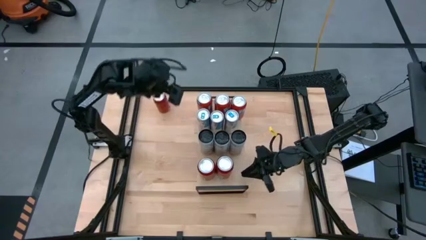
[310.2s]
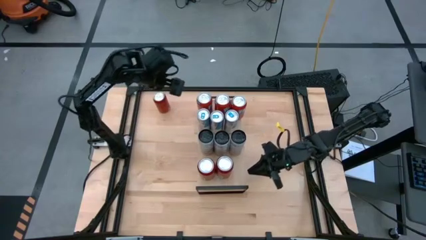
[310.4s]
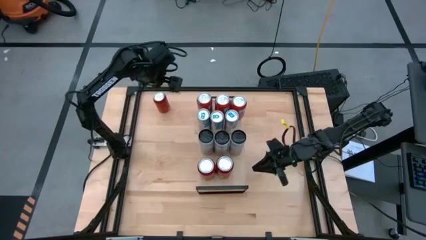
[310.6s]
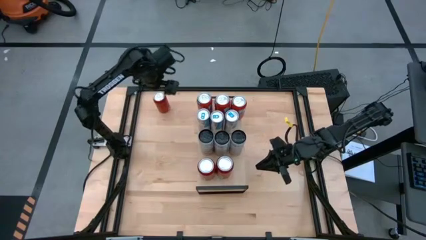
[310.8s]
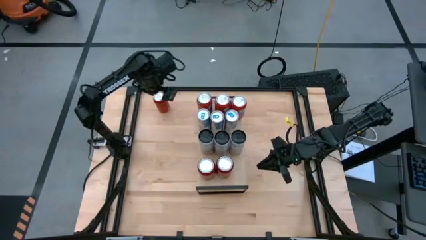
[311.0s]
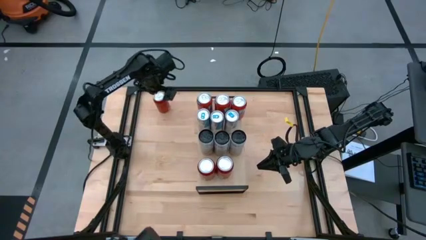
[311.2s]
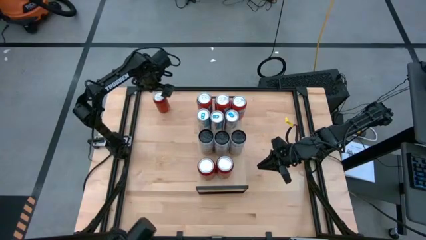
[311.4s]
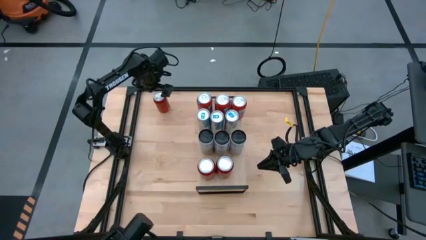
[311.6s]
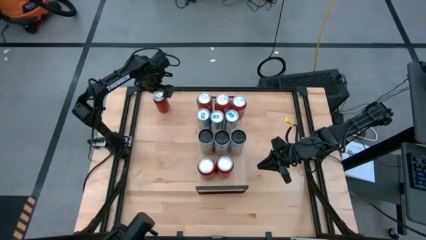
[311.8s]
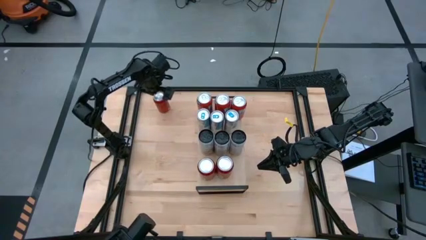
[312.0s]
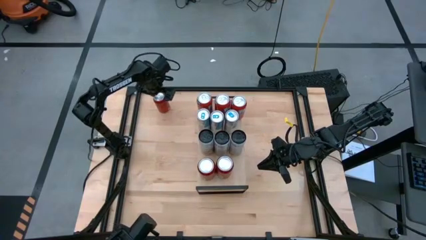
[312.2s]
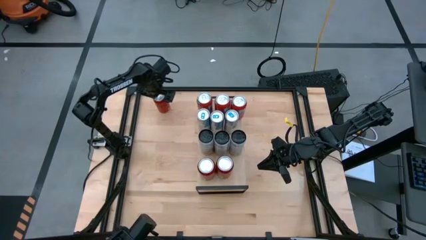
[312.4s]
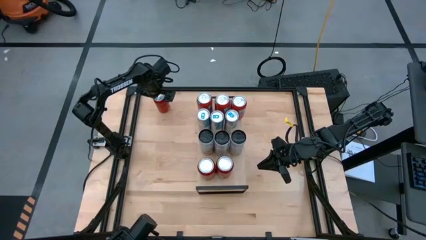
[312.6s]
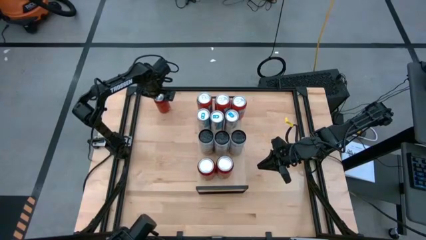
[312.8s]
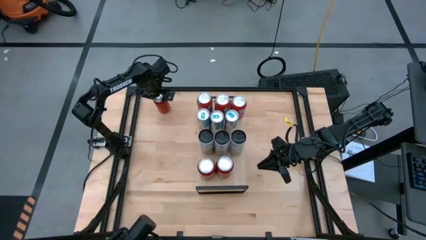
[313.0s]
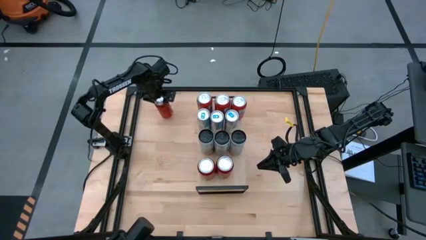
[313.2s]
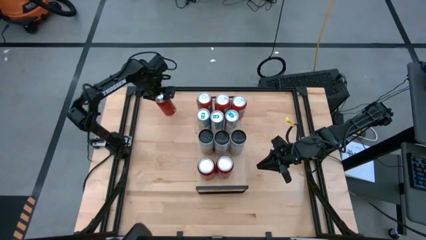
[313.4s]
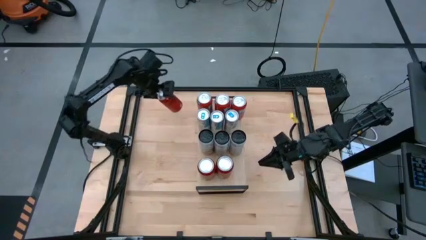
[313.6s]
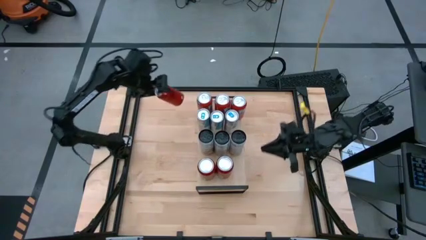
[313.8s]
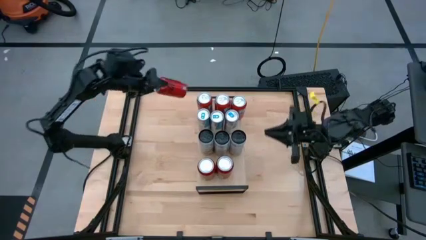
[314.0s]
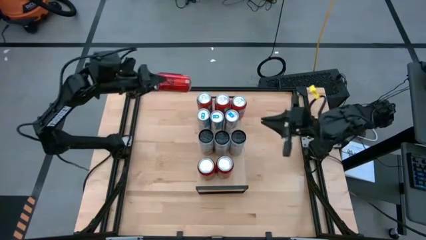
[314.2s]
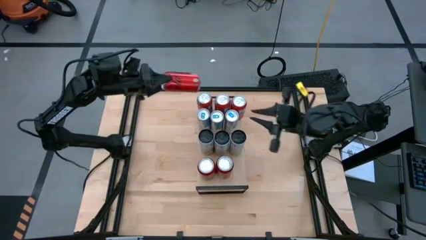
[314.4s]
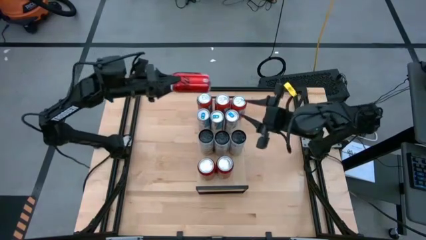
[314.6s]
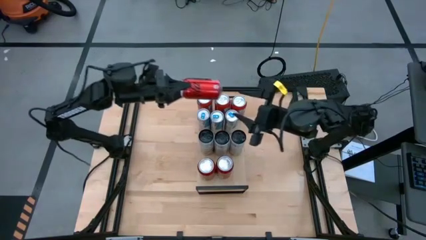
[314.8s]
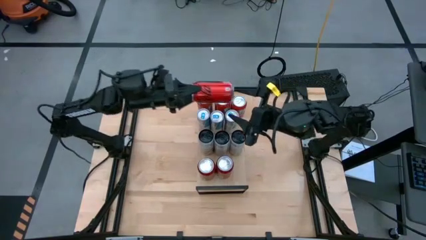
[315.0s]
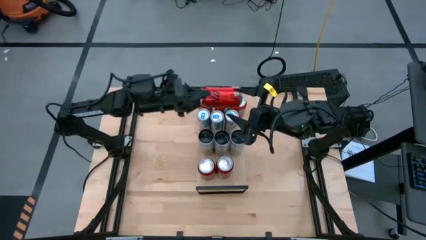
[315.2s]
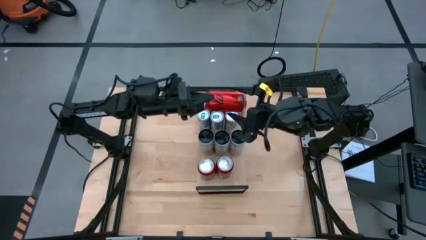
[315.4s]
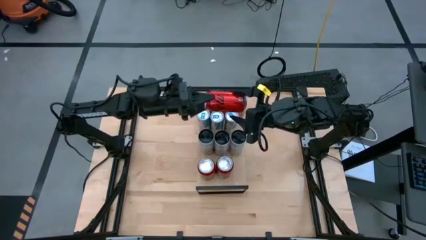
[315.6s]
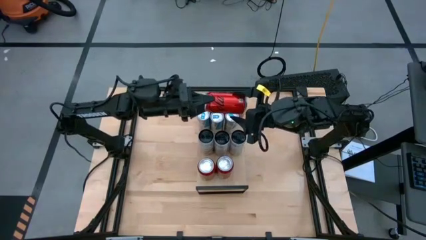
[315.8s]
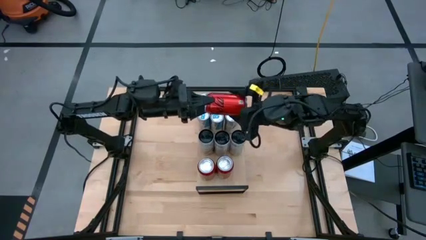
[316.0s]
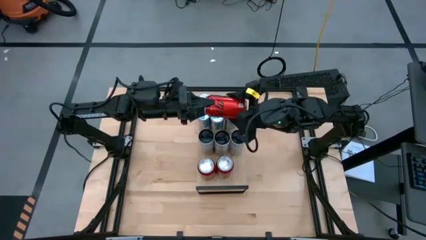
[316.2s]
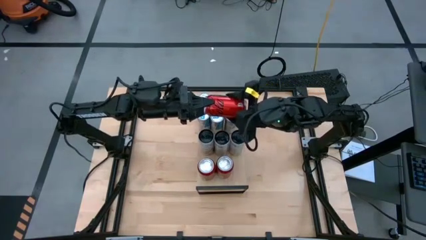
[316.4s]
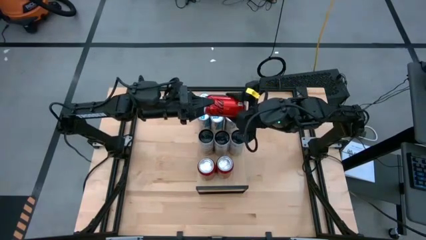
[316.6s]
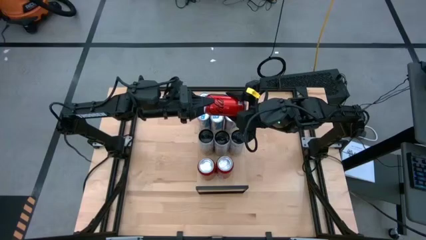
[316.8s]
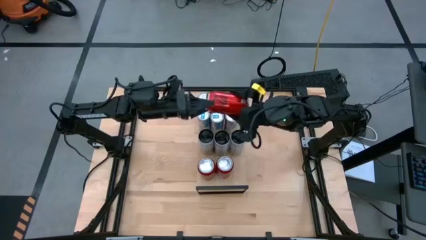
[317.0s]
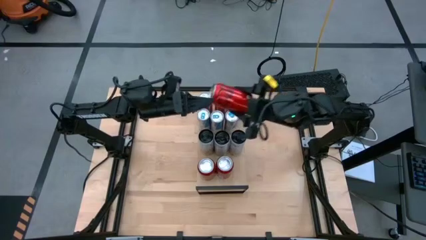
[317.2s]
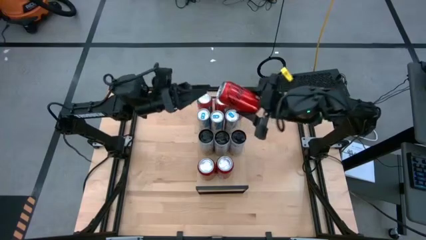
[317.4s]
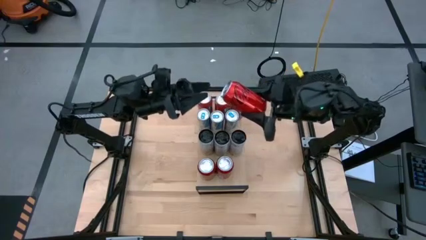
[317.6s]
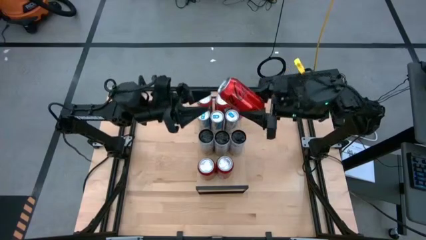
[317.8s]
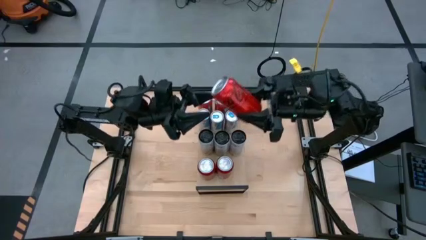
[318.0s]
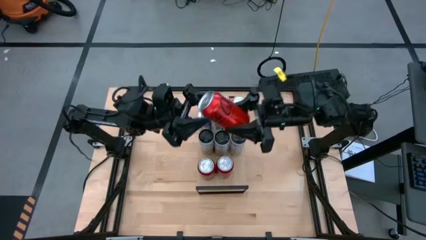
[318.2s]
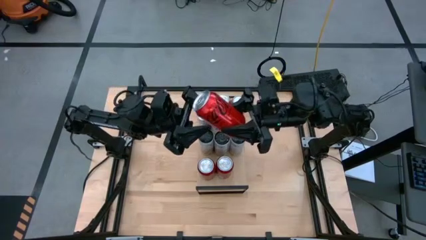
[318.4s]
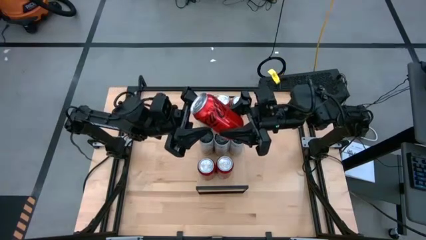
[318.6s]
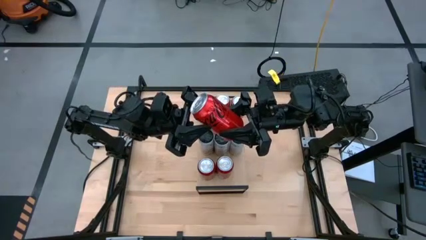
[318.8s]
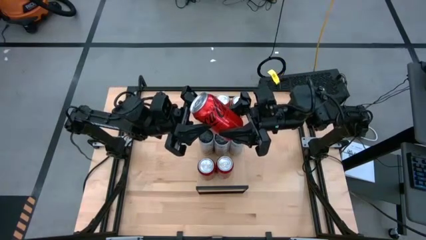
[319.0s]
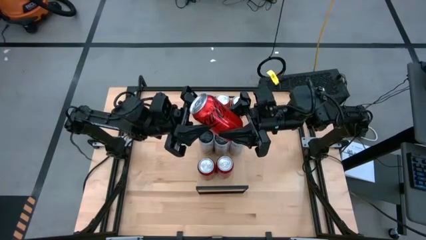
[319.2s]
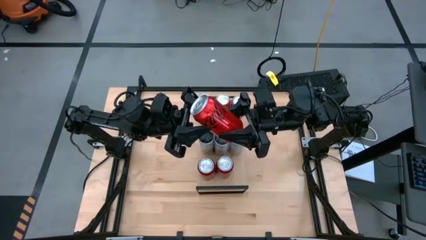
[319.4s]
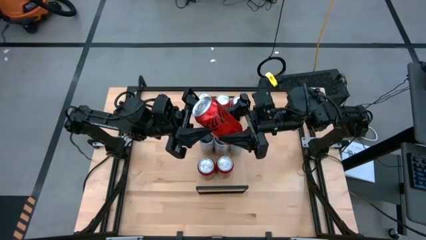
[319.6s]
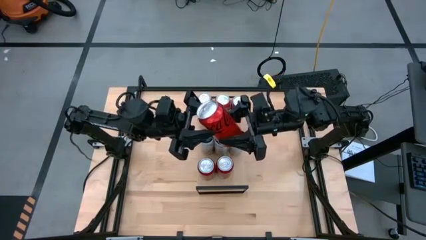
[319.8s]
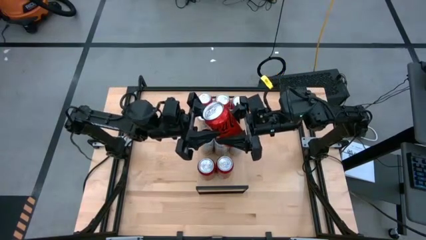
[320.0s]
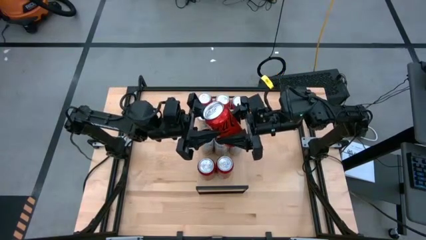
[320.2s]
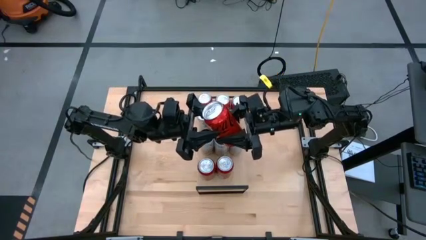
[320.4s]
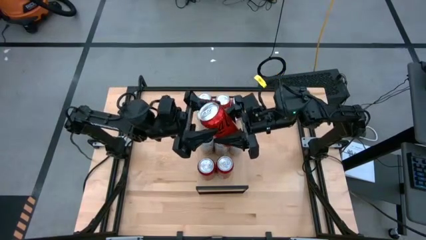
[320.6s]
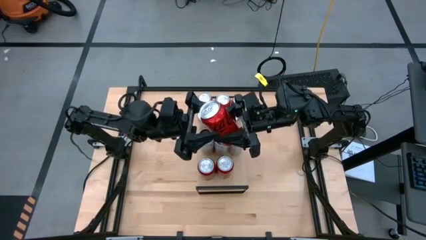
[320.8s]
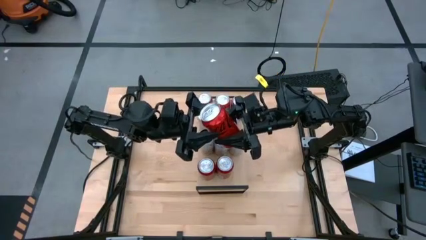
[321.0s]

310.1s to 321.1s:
Task: Place canned beverage on shelf
Put the red soda can on the shelf aligned with the other red soda can
